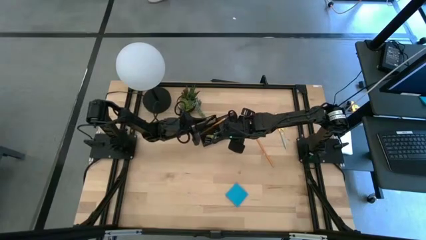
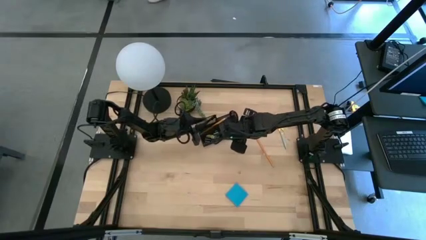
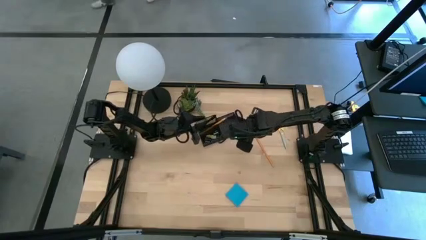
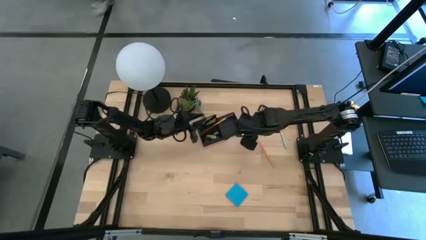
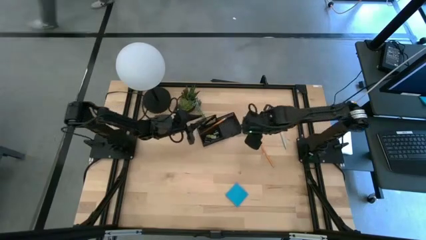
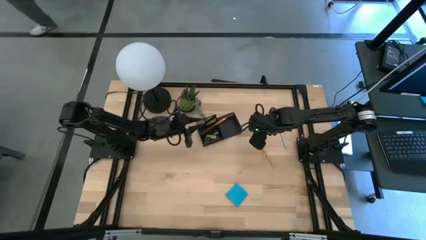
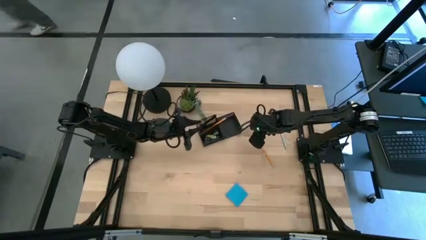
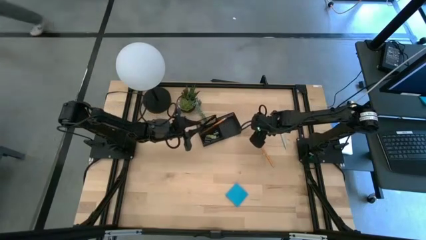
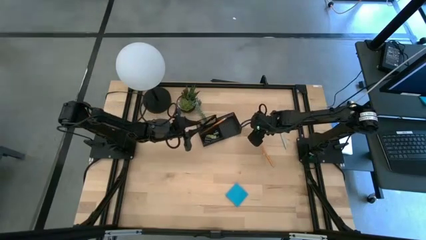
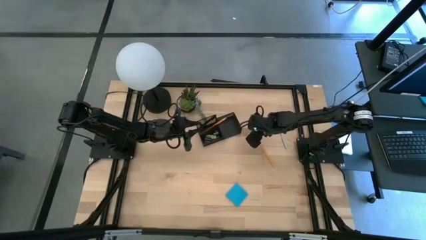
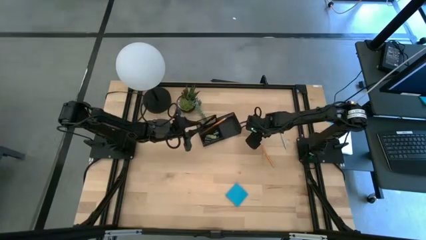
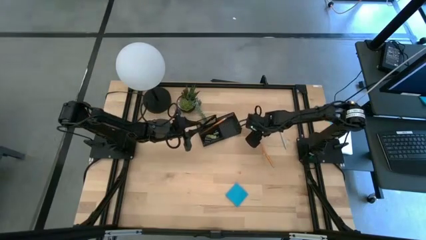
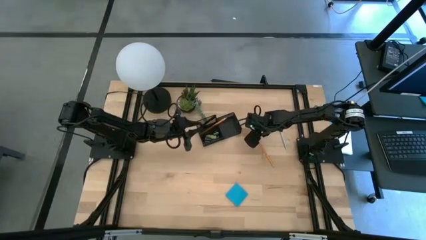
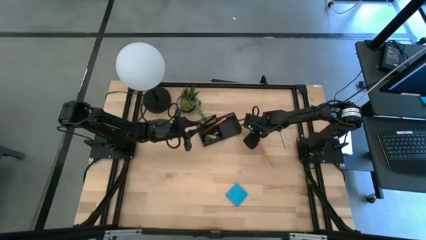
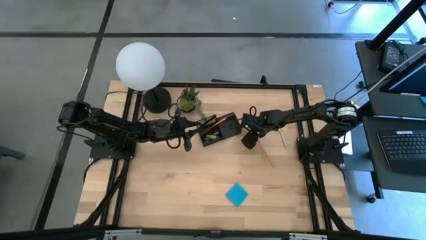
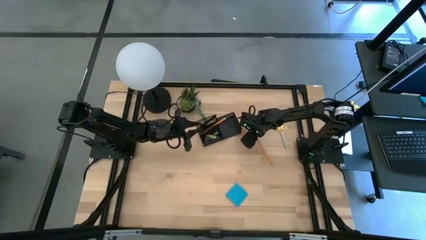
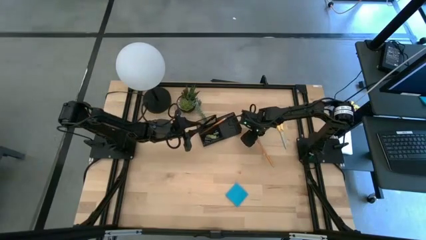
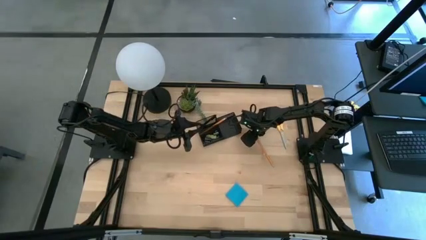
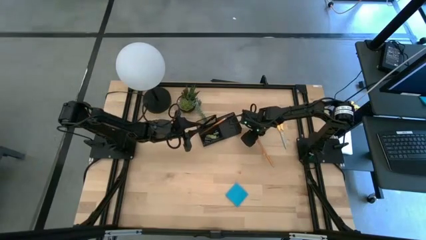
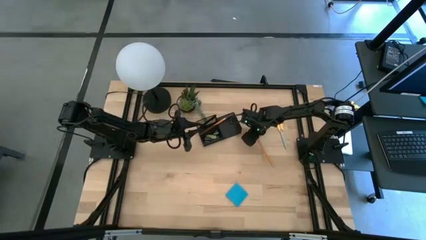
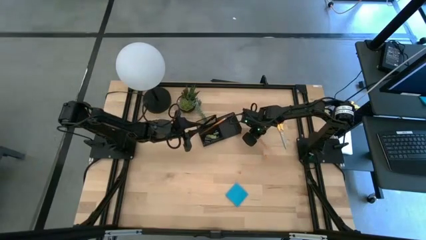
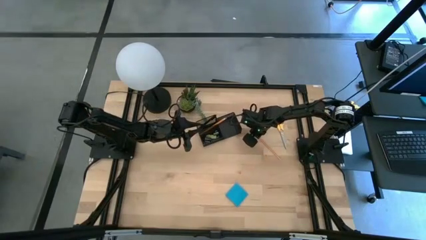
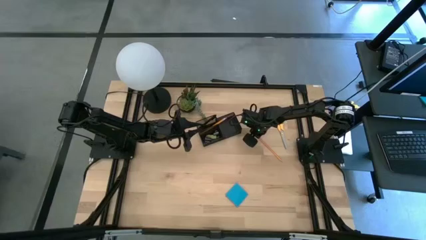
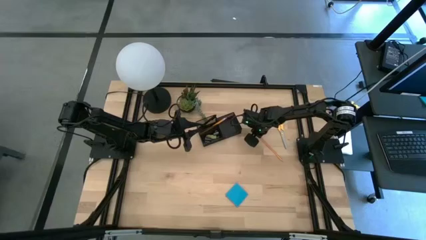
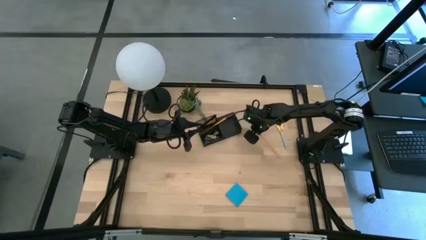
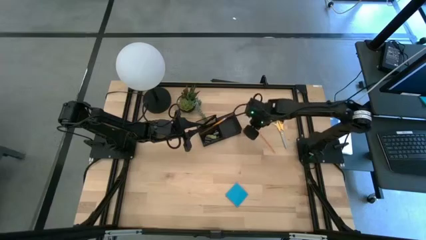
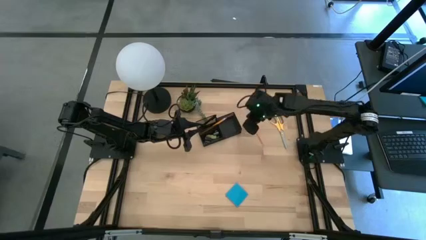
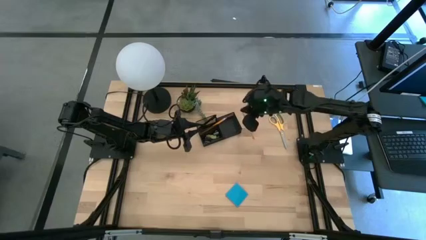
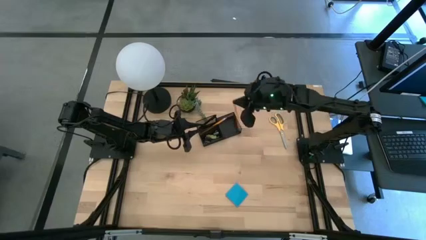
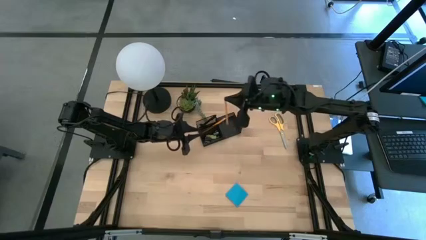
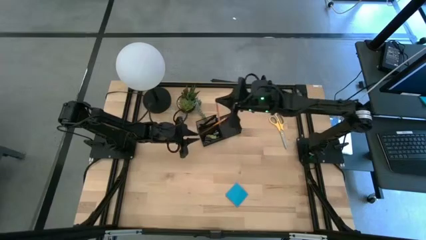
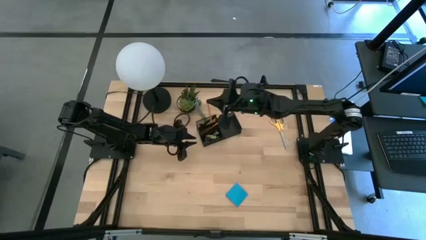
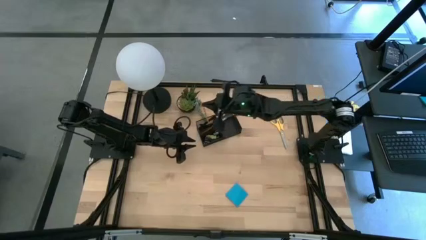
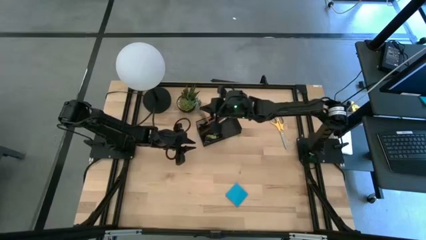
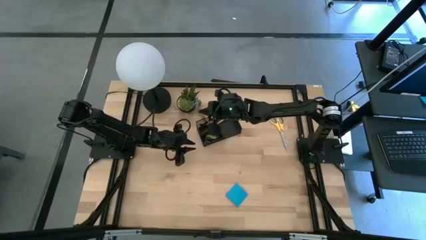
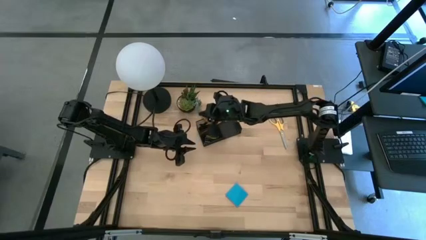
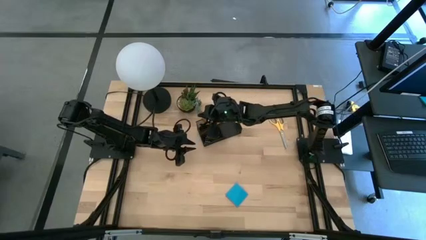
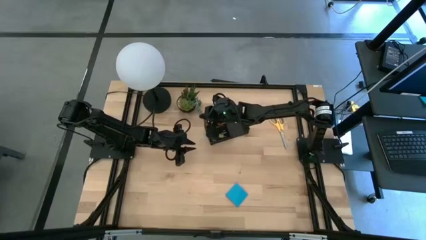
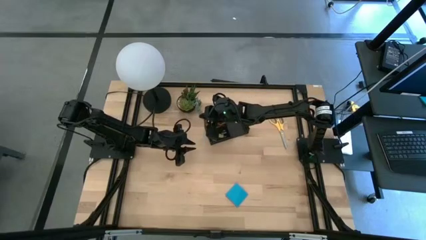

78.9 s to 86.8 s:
Task: Pick and place office supplies into organizer
Put the yellow pencil into the desk organizer

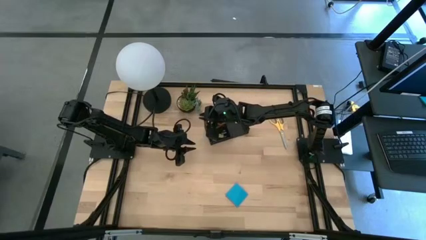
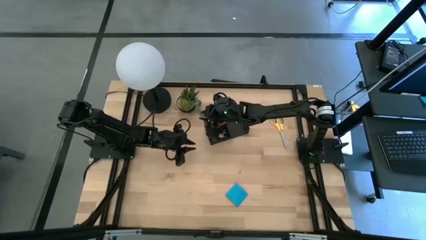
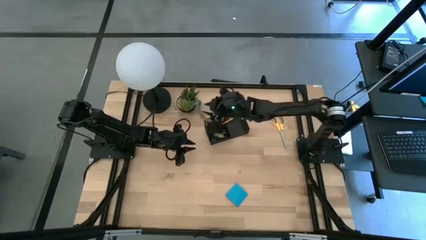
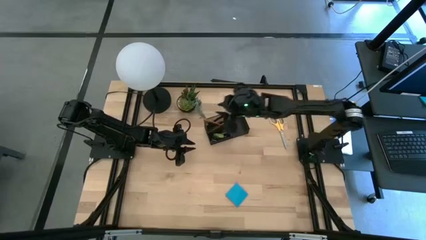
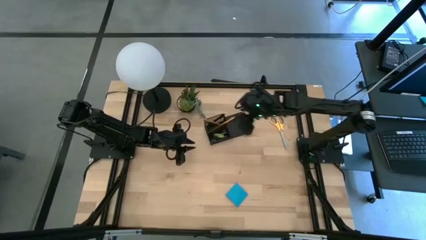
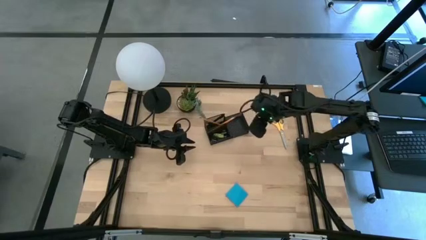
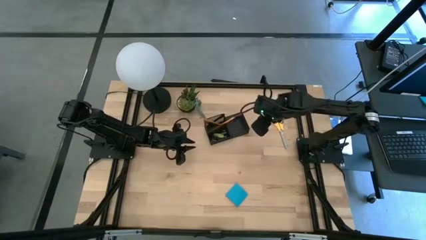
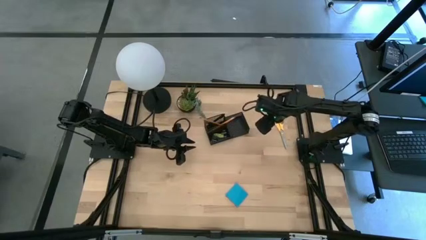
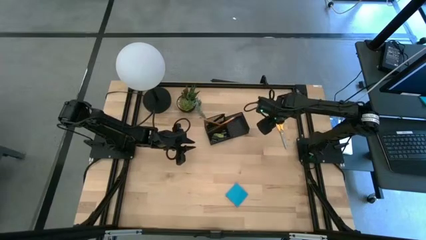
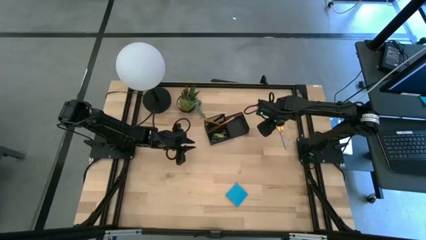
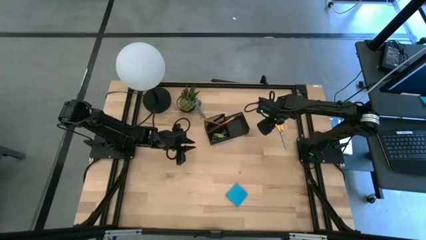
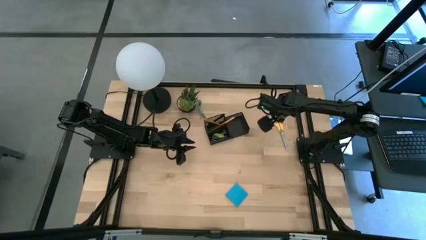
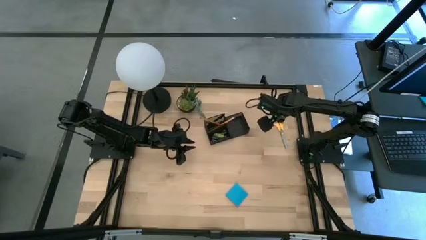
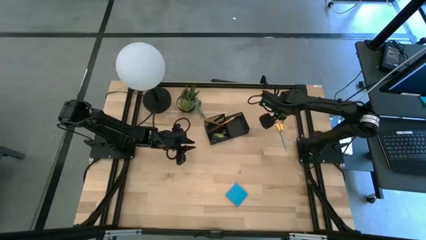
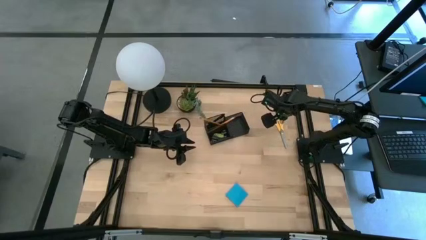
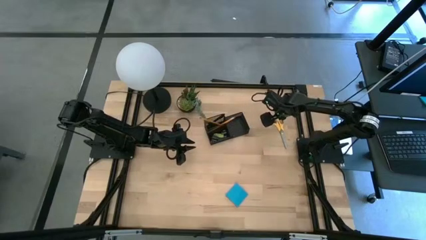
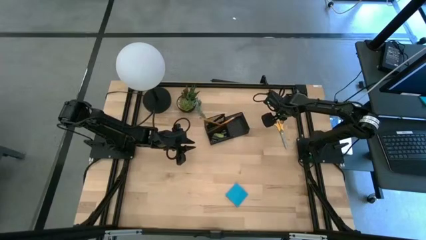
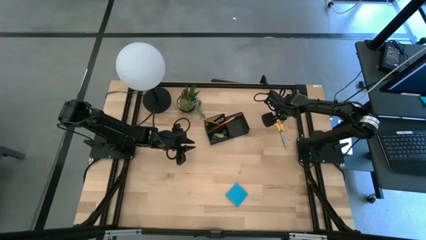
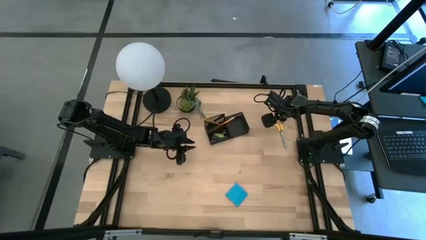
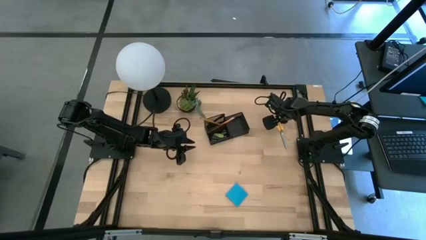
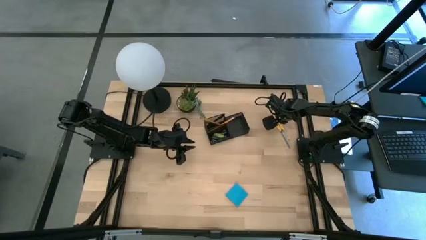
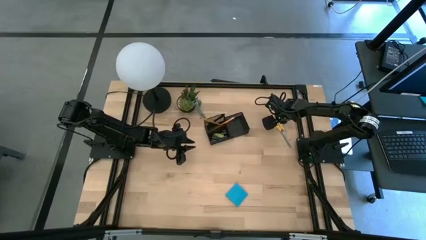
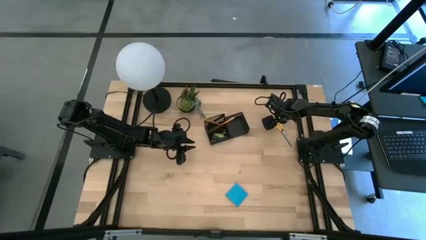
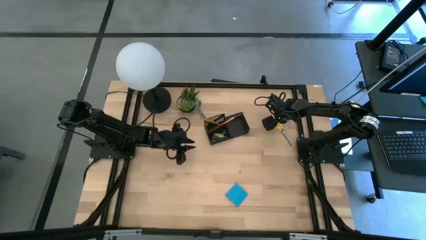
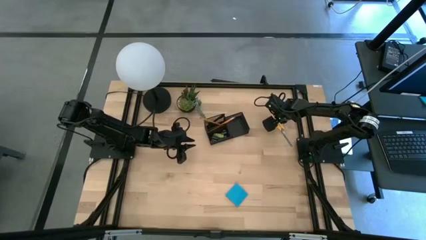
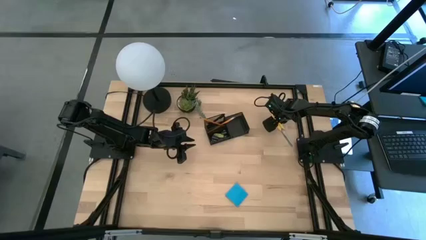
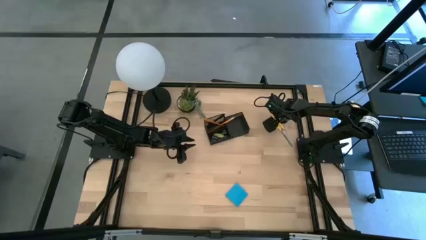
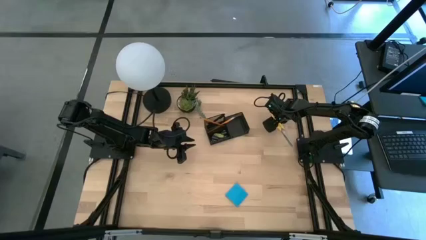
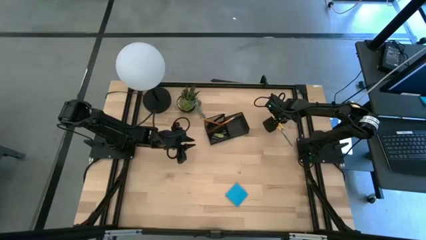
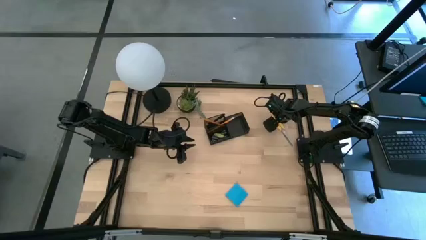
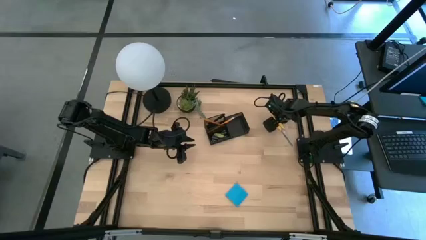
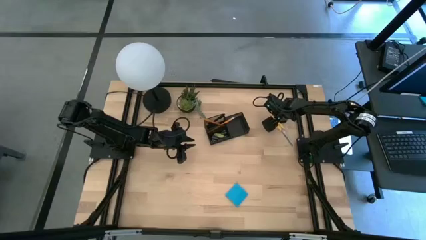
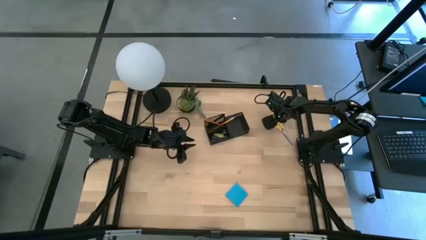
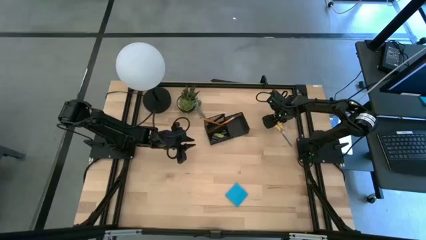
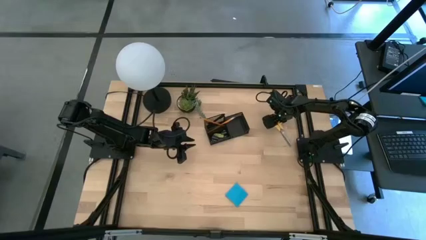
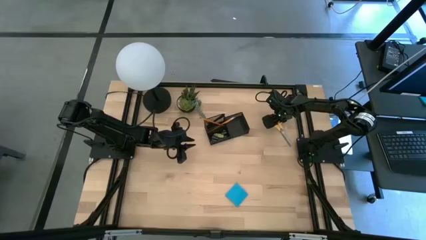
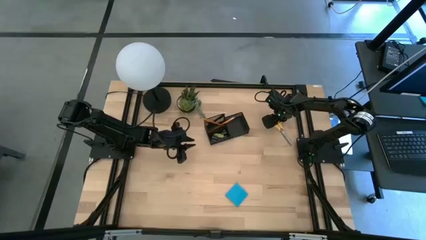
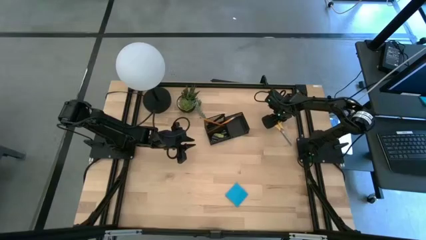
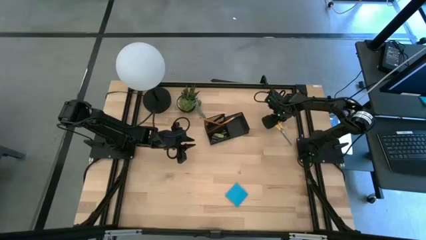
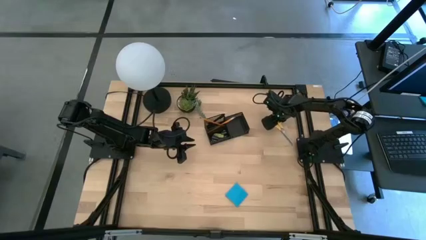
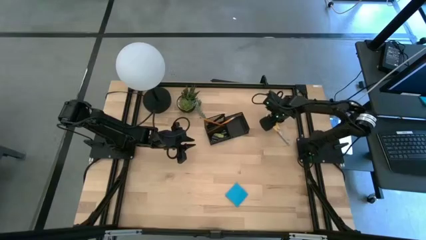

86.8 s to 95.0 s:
Put the yellow scissors into the desk organizer
